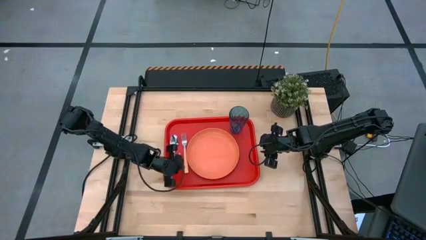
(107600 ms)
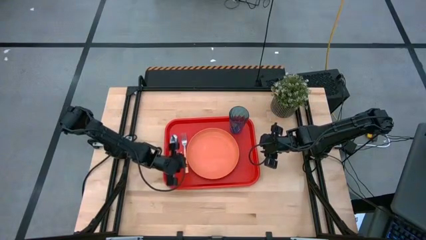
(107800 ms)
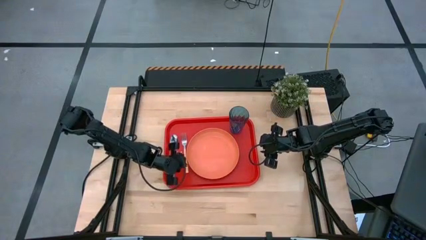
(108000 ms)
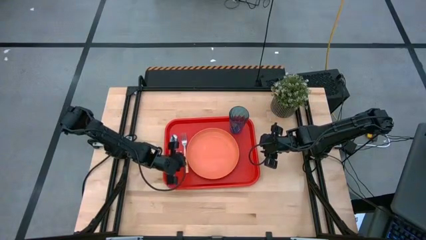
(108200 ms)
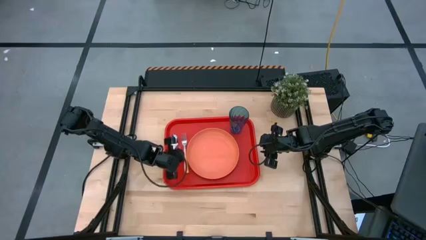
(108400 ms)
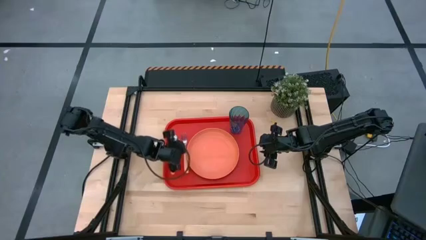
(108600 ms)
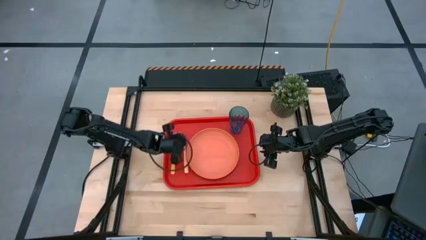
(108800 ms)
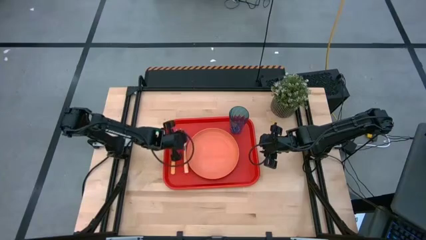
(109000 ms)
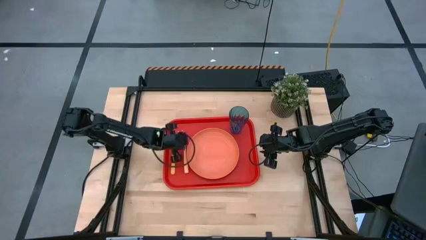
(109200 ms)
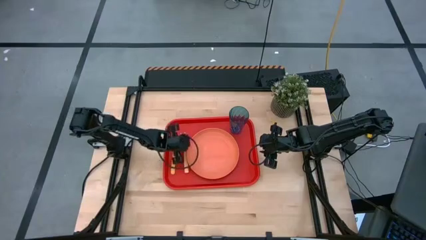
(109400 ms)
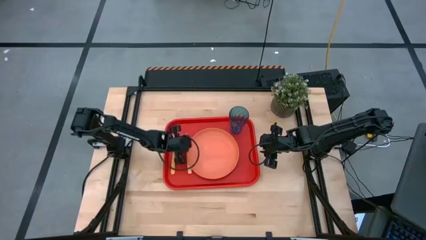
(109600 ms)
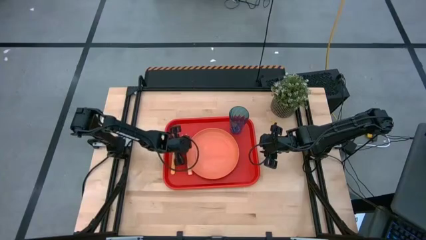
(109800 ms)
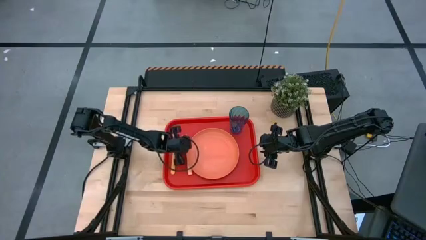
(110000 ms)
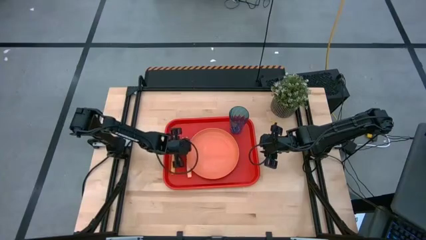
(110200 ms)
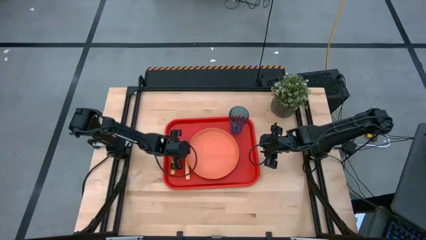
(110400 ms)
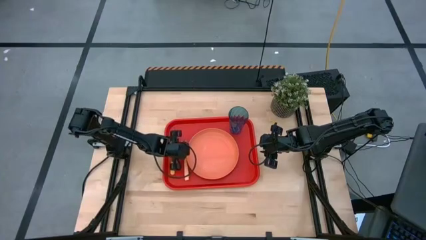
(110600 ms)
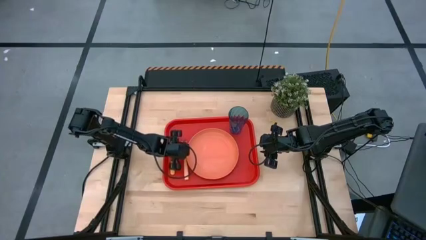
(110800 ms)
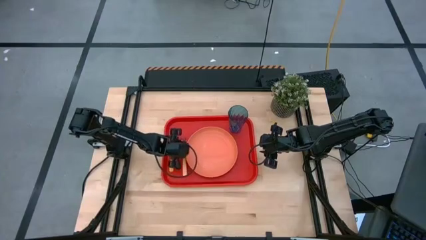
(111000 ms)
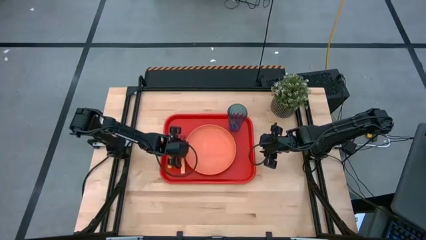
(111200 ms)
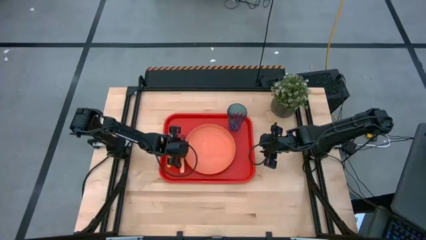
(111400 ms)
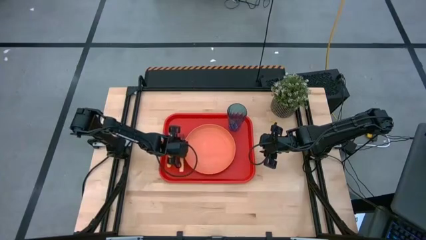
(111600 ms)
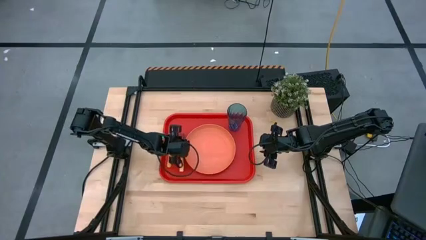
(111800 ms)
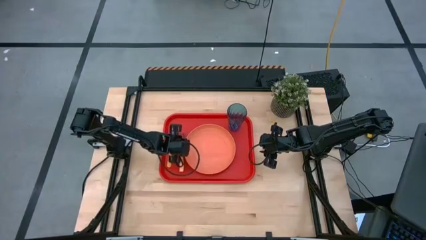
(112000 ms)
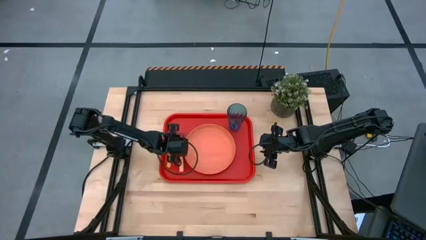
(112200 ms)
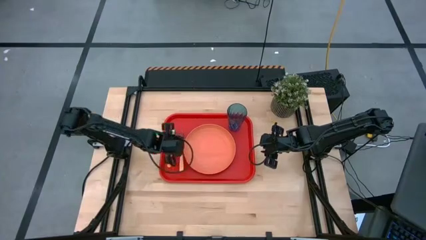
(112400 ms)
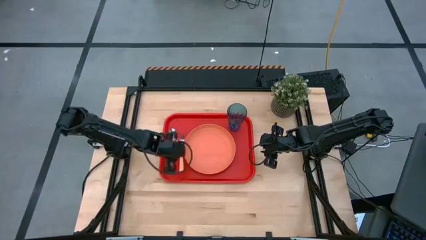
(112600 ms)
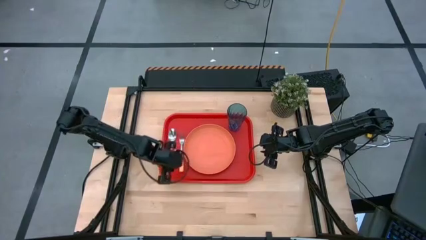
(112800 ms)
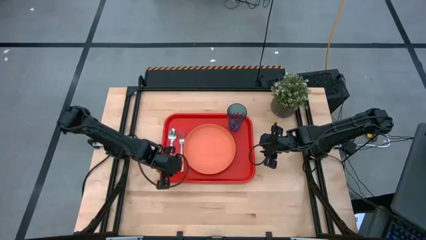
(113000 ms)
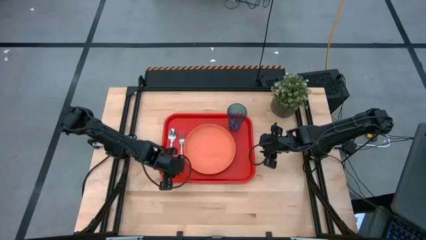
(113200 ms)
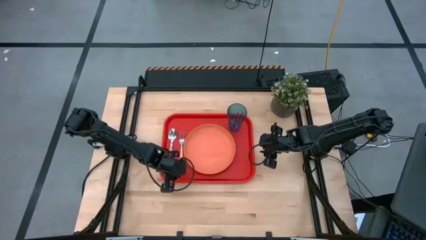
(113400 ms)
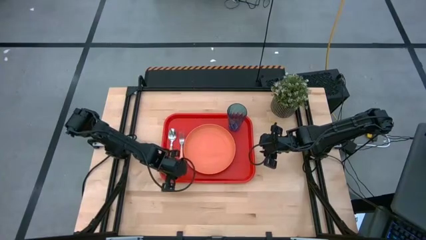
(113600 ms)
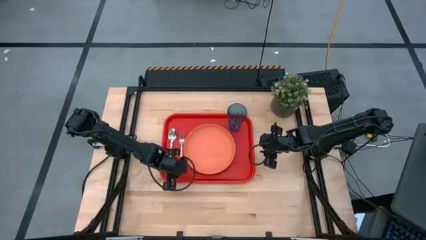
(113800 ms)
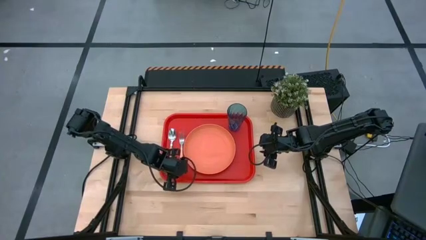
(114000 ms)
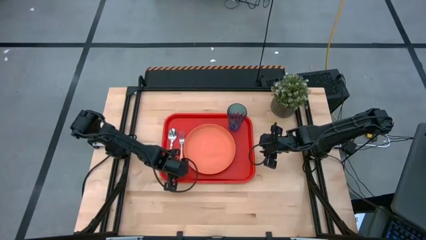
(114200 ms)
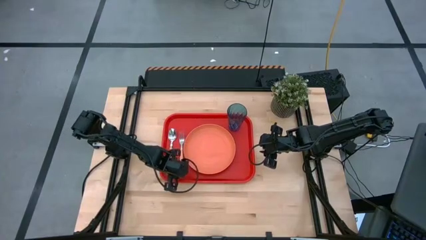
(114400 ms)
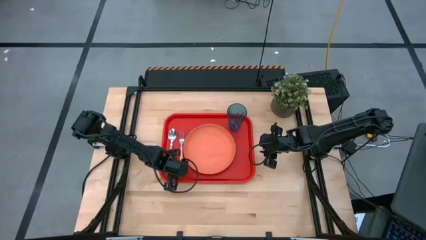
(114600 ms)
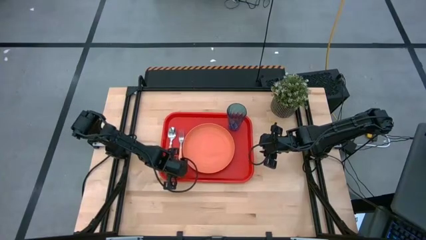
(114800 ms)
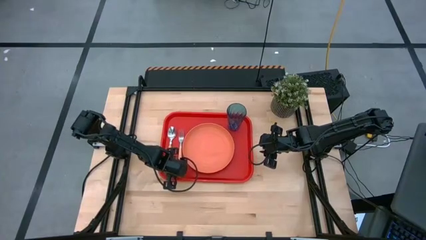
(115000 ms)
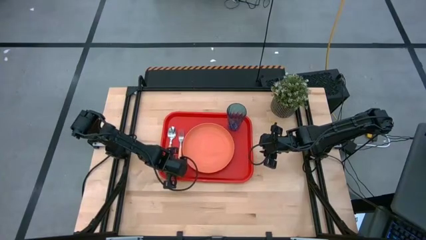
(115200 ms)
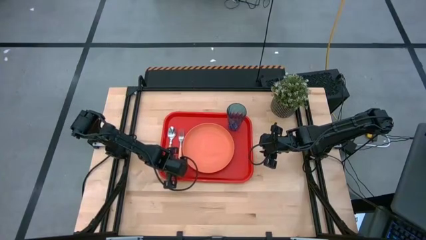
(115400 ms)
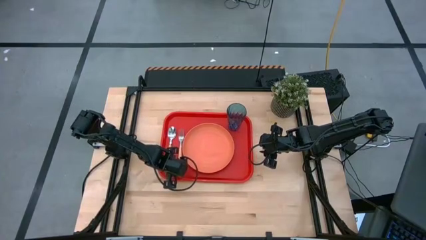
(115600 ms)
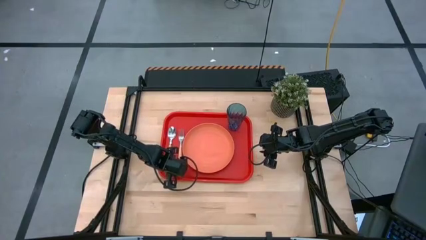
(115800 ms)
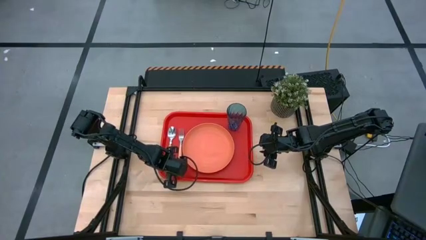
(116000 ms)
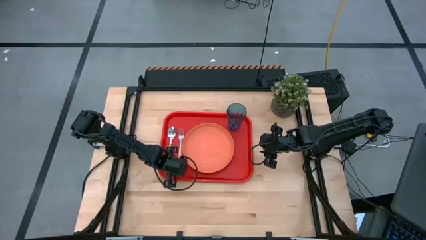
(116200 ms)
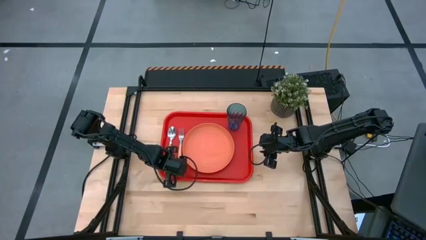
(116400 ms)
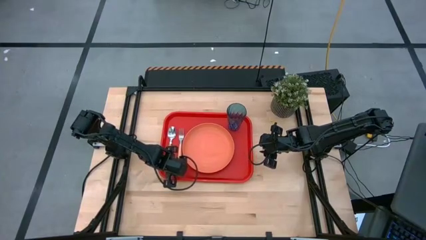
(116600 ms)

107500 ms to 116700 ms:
Task: Pick and place plate/cup/fork/spoon on tray
Adjust the the light orange spoon on the orange serving tray

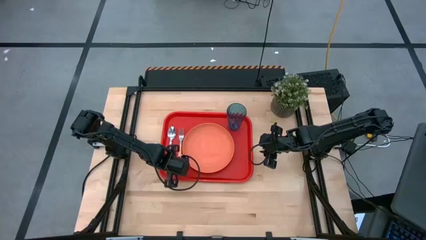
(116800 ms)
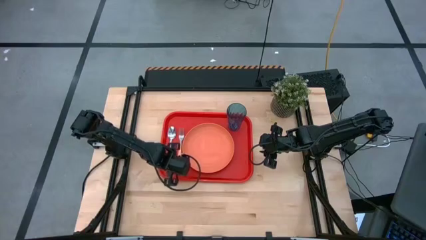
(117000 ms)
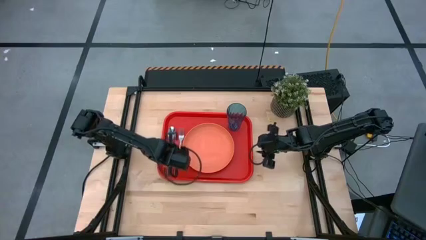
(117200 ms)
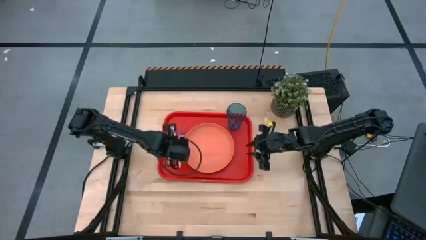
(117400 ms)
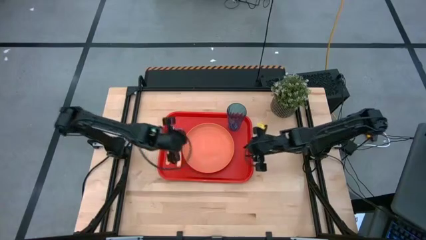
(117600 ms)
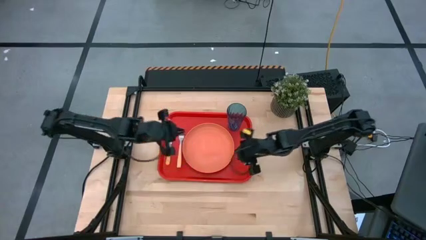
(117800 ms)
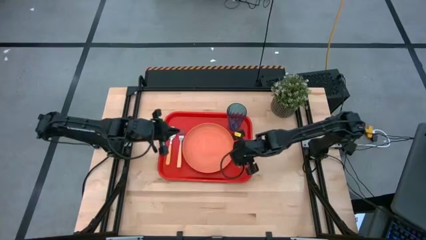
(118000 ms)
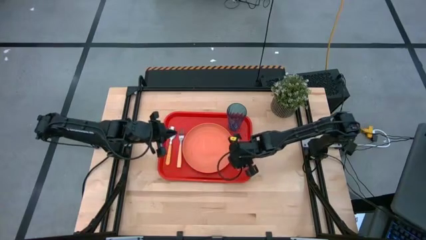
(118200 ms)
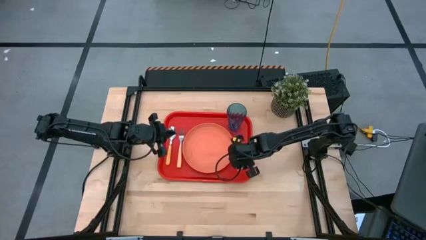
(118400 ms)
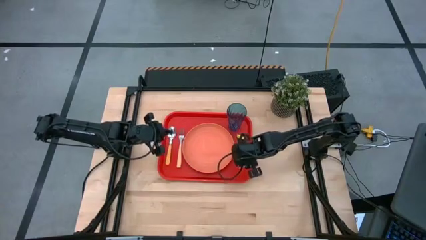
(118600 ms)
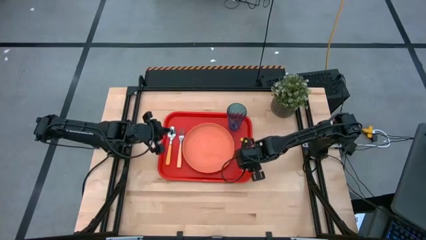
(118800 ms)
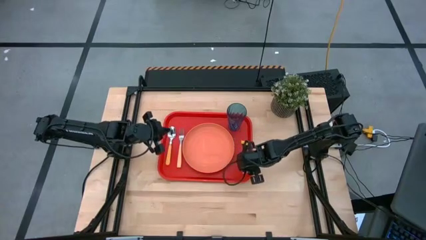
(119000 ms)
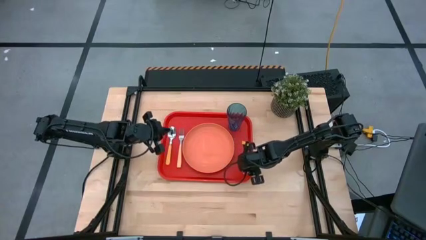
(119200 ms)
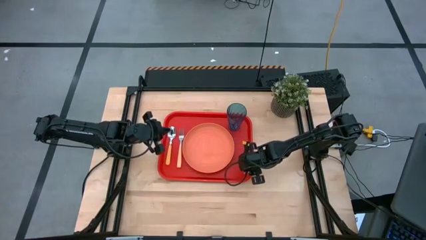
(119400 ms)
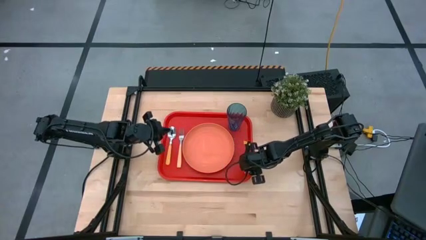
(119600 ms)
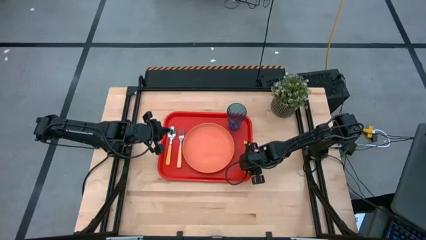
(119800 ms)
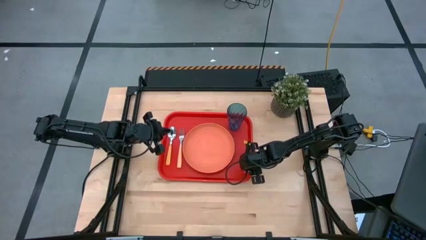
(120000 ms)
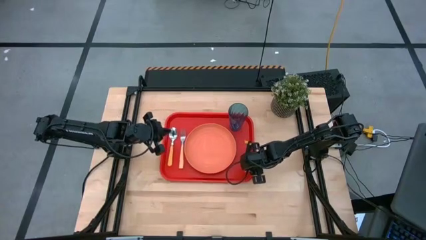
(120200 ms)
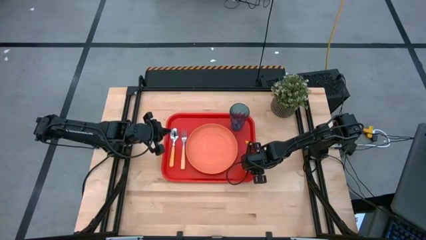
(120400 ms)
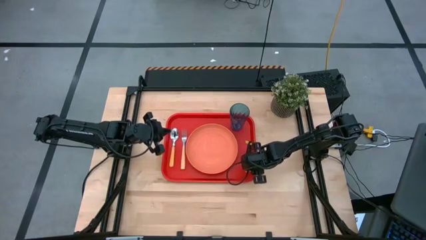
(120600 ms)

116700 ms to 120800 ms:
Adjust the orange tray on the table

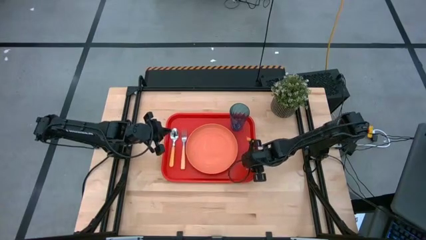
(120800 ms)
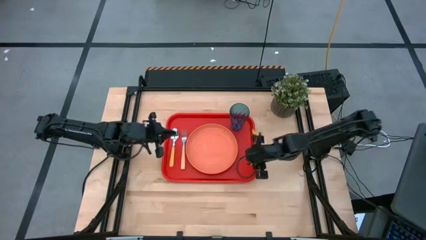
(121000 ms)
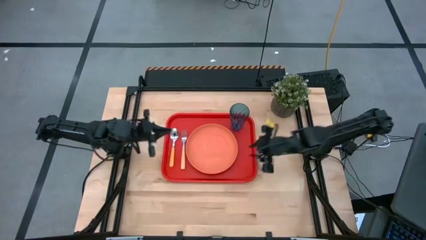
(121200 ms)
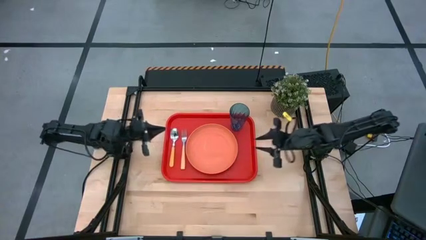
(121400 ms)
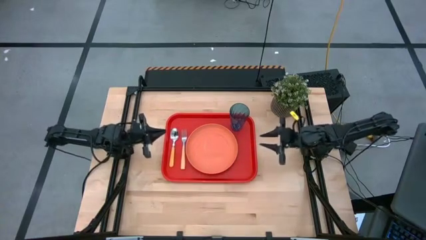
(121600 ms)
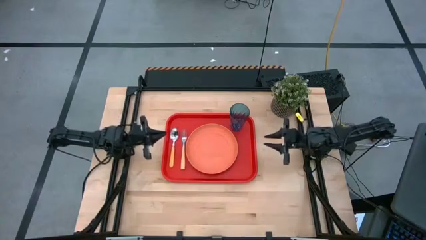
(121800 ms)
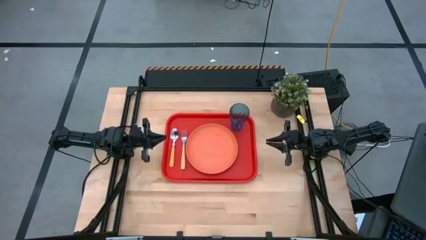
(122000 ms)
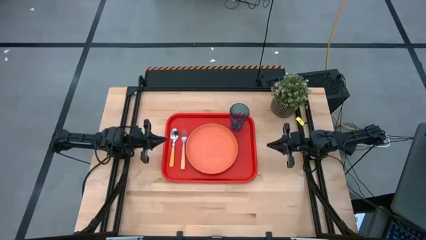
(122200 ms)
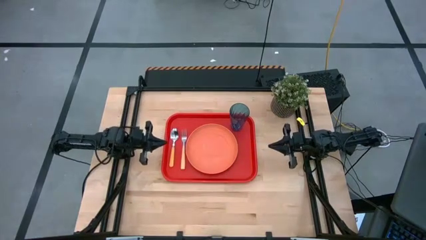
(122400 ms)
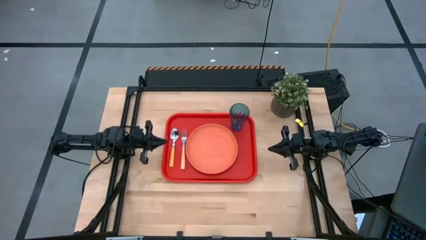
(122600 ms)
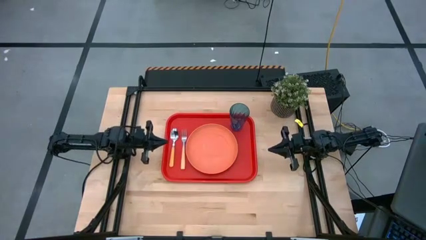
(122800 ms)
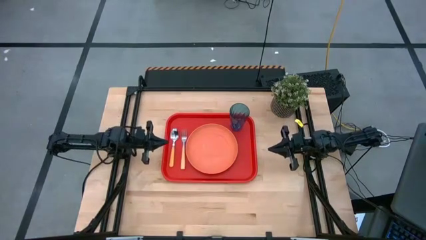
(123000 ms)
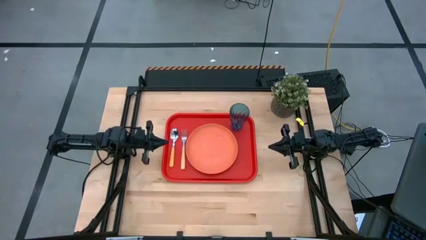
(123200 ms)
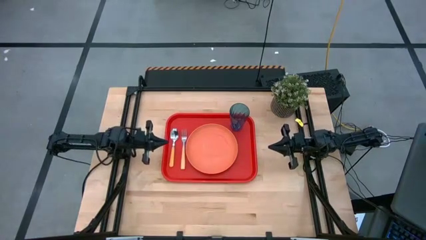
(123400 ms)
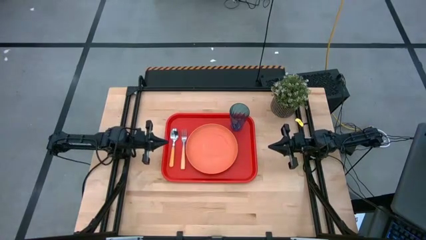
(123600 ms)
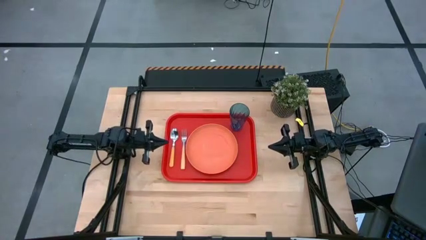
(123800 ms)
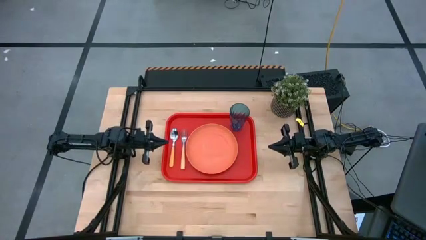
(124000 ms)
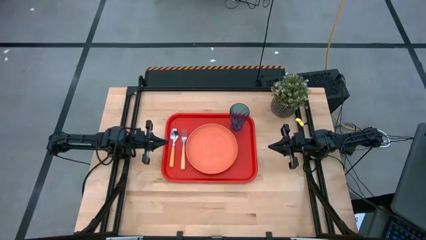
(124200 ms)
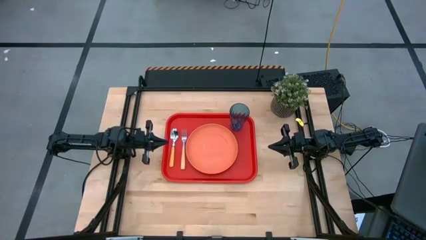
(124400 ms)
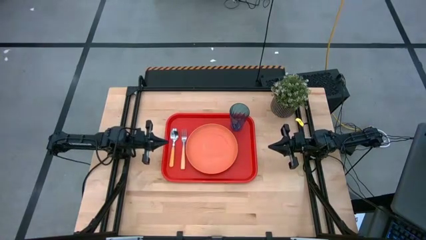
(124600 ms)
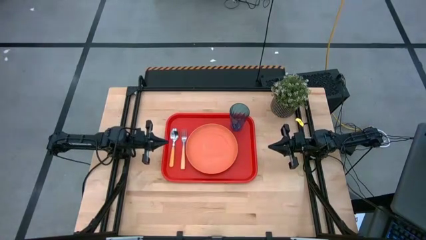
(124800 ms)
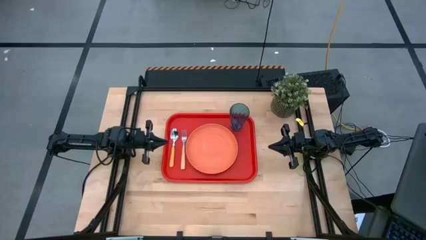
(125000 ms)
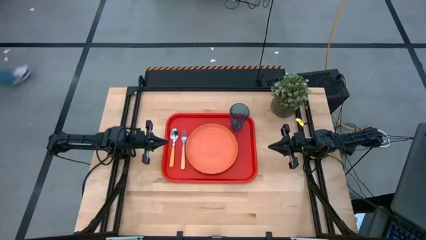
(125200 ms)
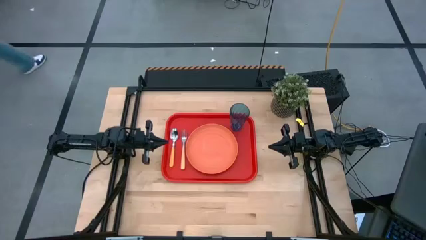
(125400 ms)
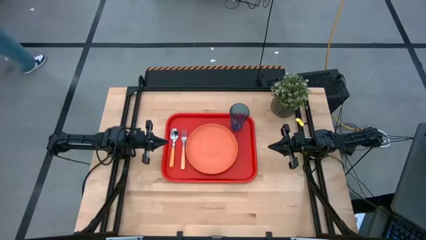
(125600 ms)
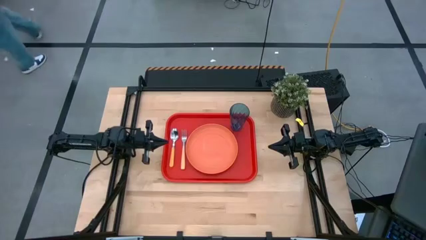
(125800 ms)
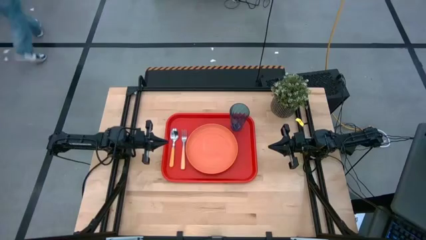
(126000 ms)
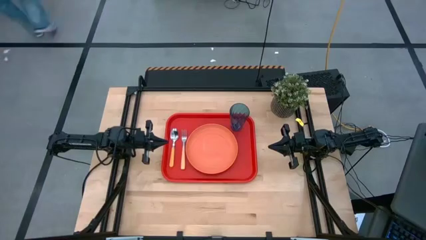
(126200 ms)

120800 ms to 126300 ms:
Return to Home Position
